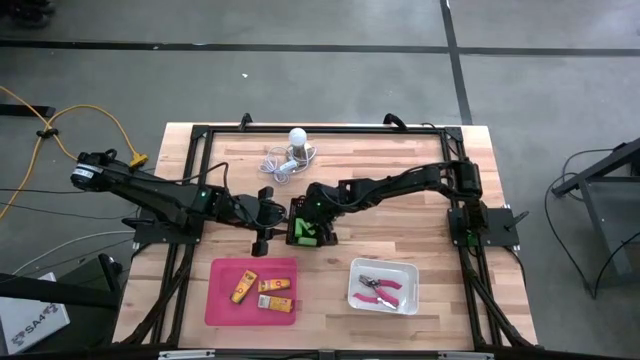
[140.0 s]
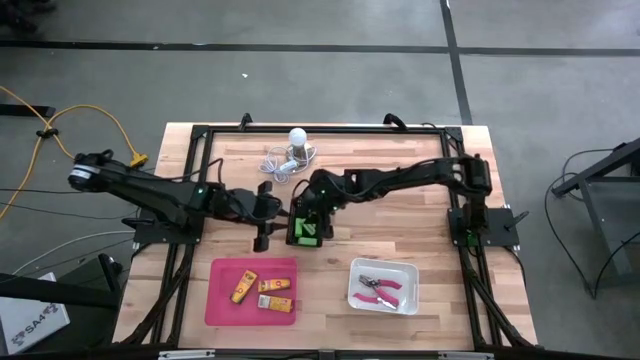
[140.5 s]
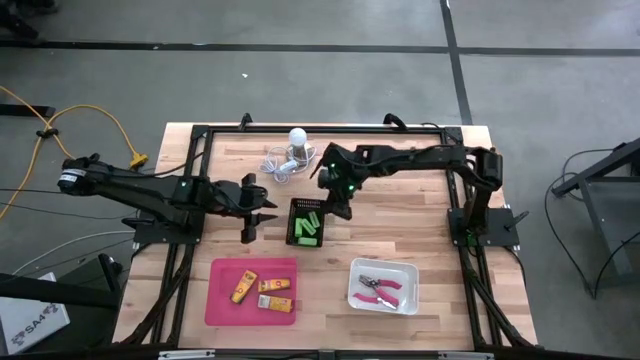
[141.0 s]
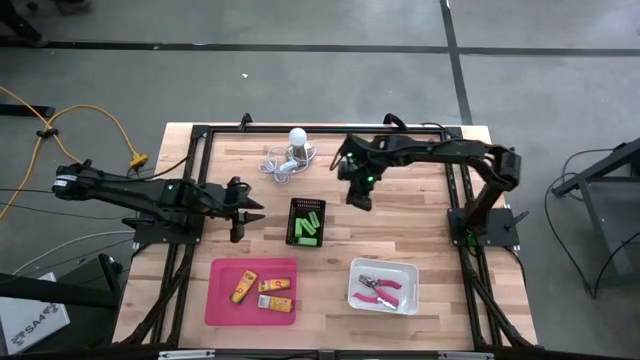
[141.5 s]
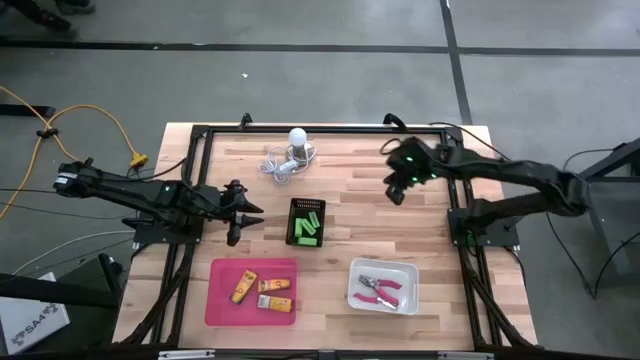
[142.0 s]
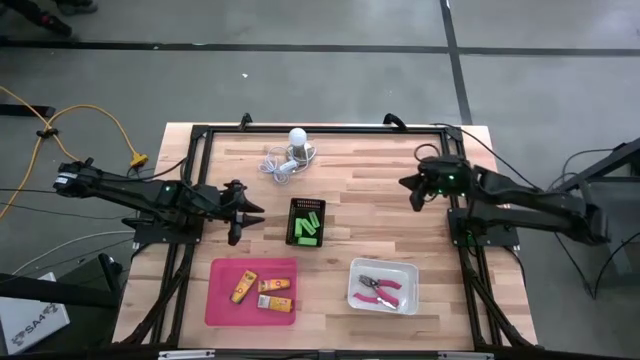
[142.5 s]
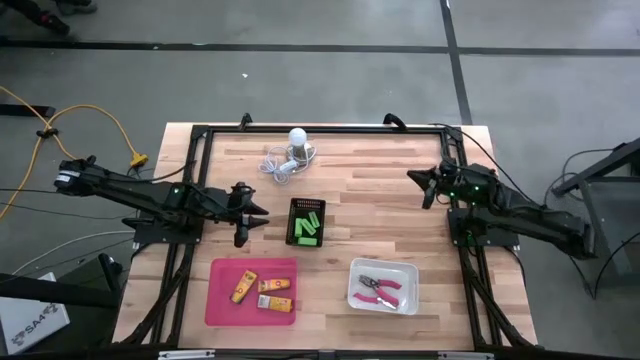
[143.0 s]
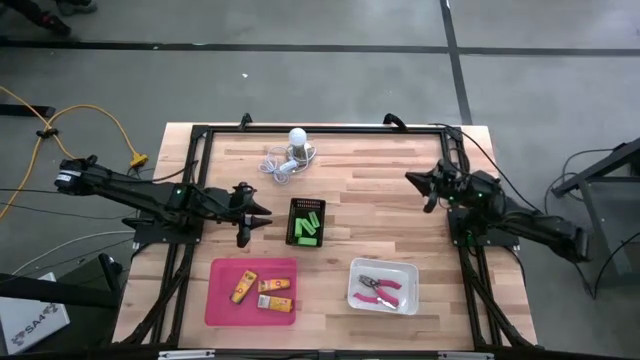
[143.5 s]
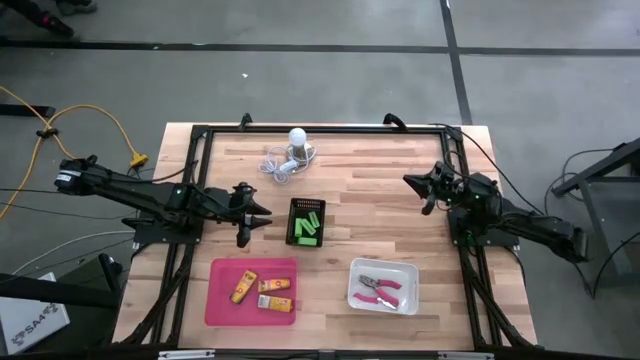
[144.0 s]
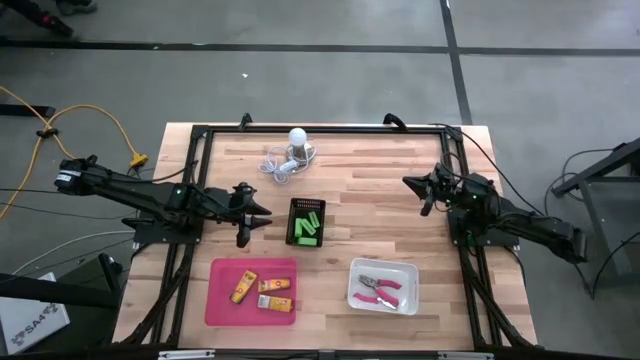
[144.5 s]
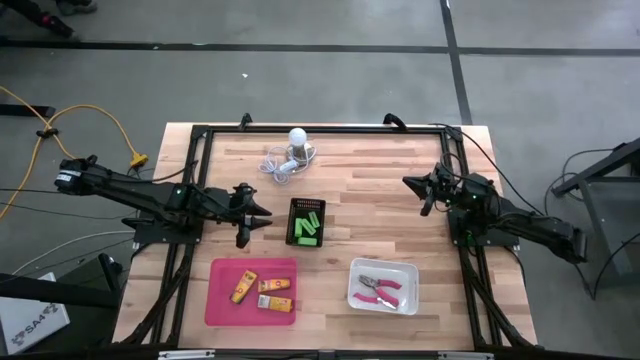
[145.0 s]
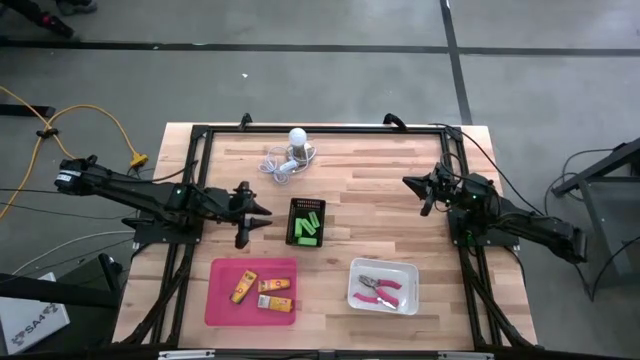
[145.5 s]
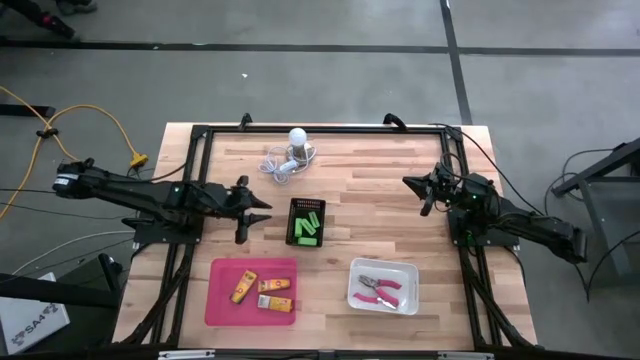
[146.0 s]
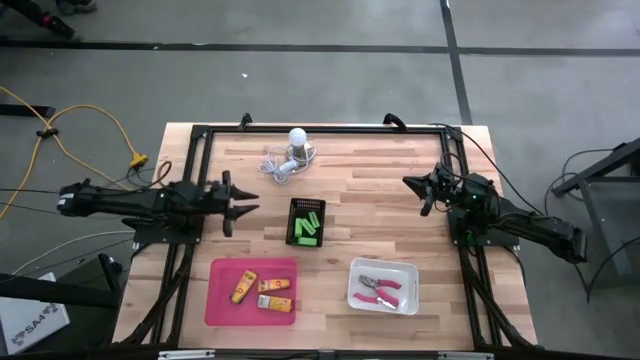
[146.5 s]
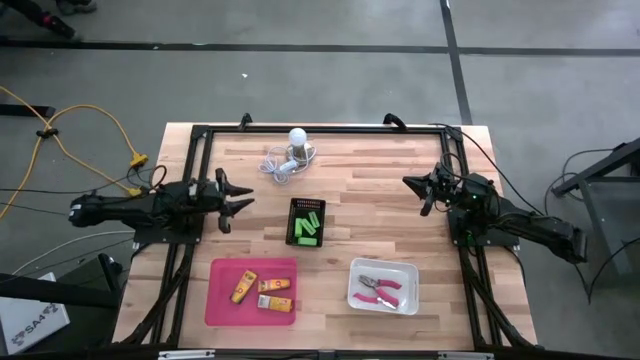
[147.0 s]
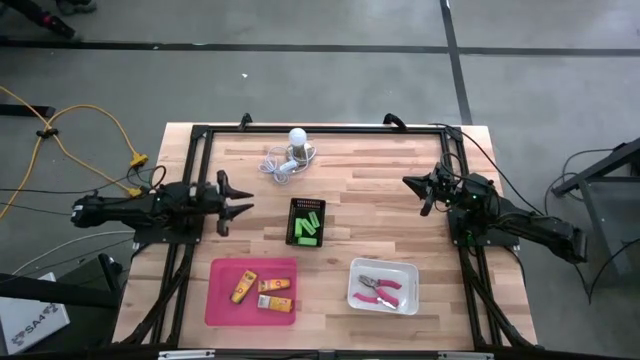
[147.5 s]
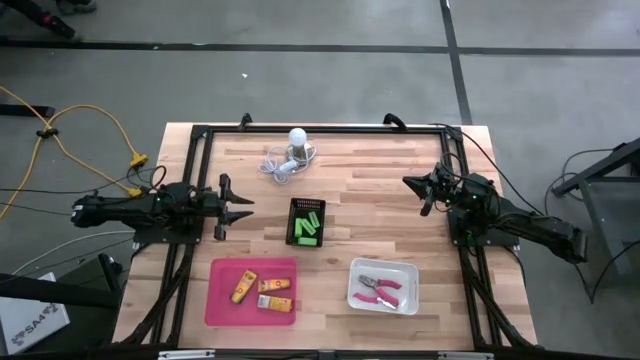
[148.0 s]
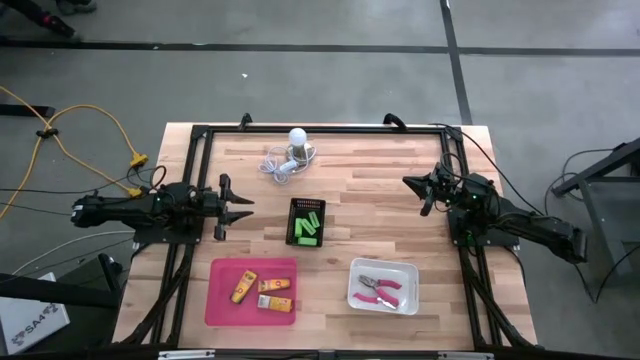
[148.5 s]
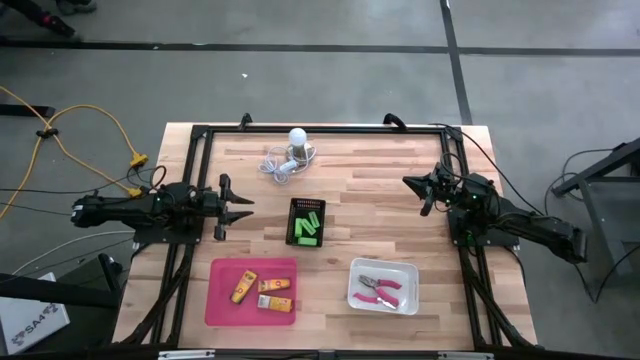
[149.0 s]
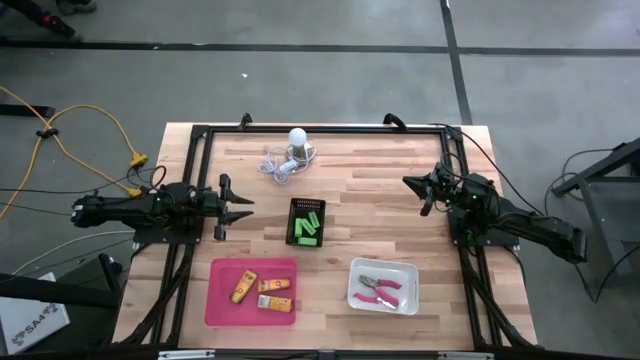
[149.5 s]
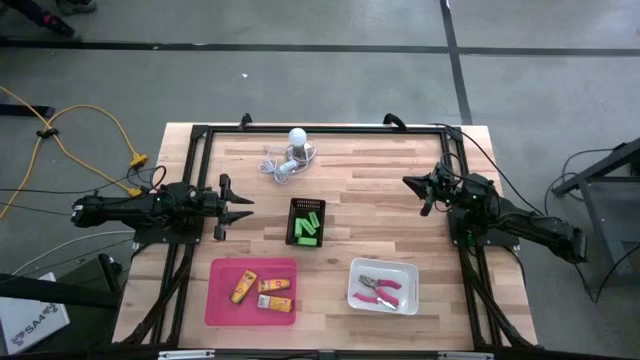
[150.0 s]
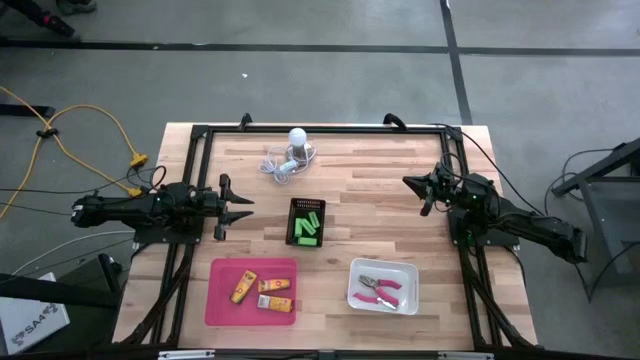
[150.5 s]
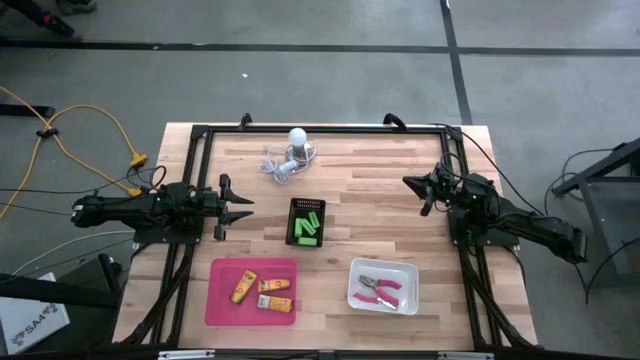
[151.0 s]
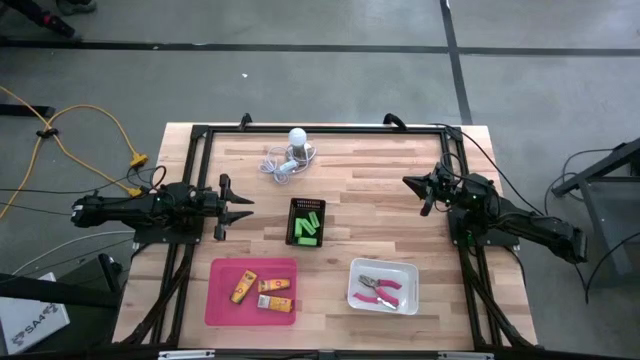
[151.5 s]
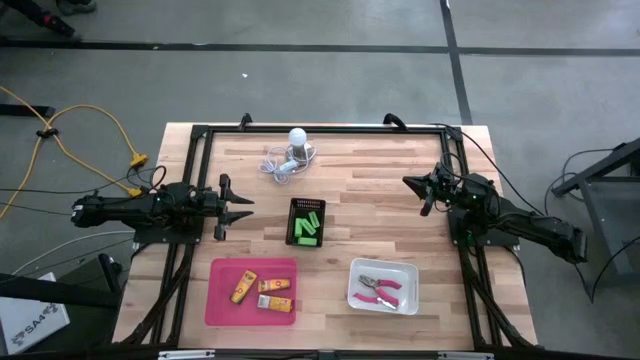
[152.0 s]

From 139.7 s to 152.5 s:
Task: Pick & Place School Supplies
Return to Home Position

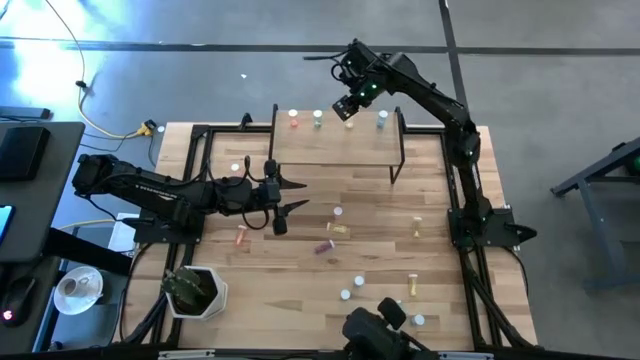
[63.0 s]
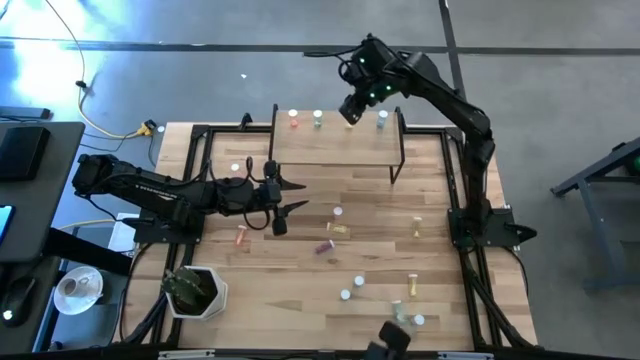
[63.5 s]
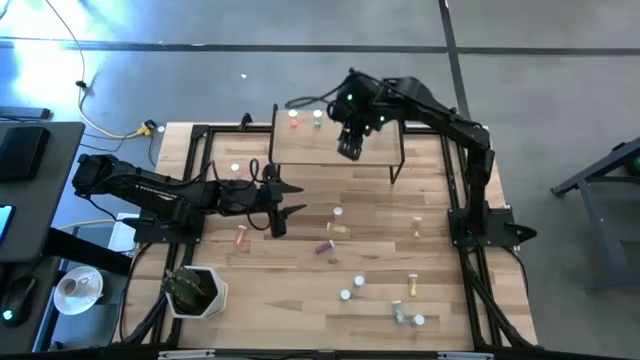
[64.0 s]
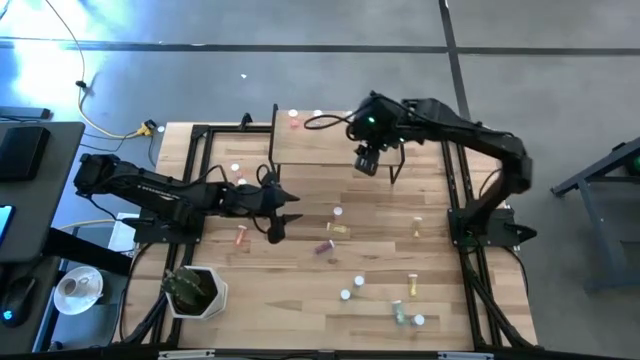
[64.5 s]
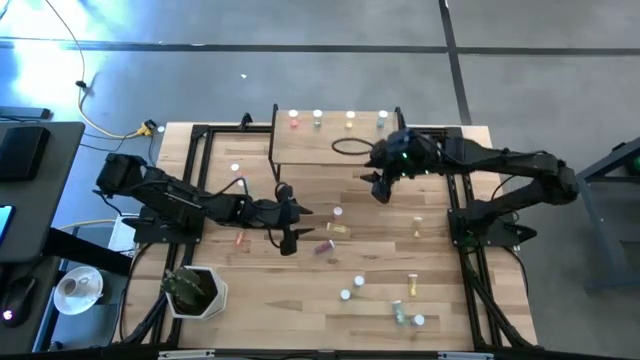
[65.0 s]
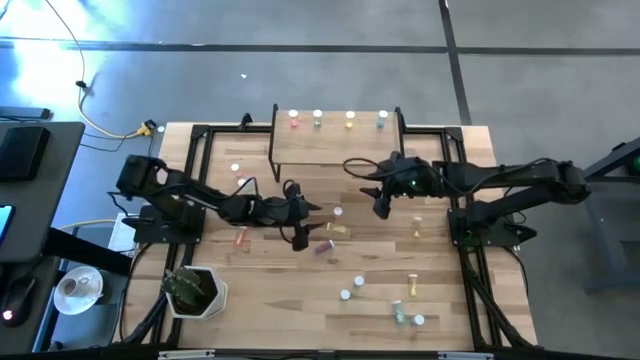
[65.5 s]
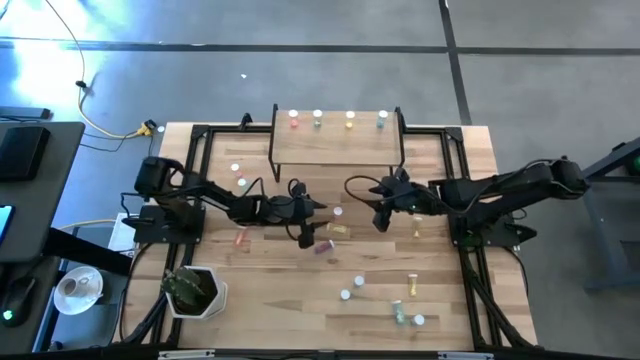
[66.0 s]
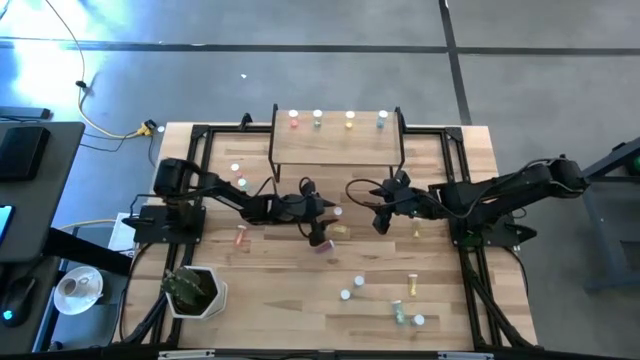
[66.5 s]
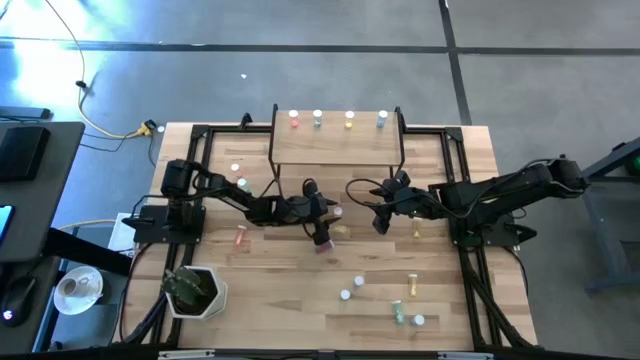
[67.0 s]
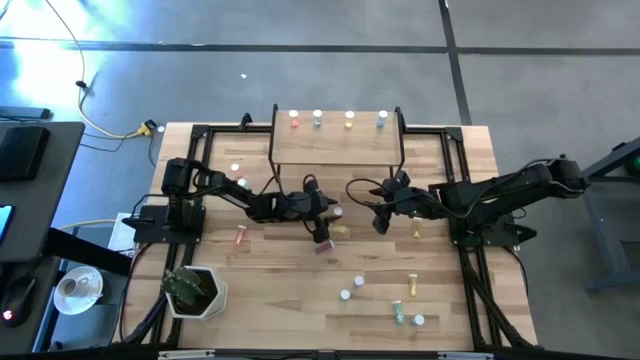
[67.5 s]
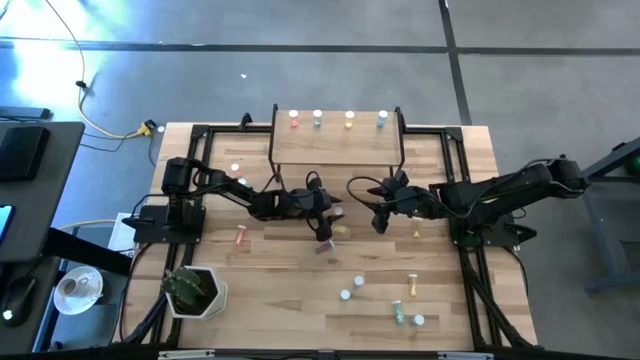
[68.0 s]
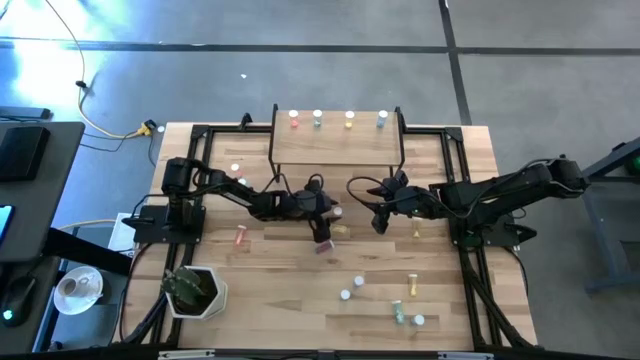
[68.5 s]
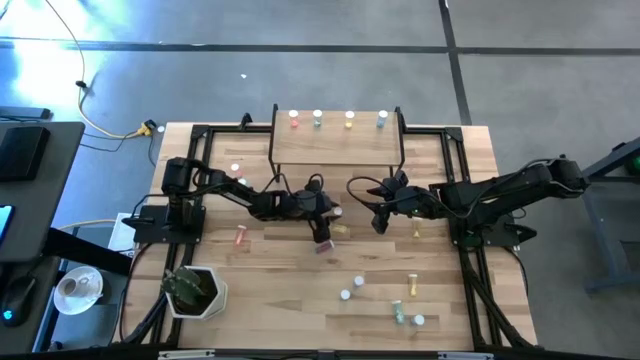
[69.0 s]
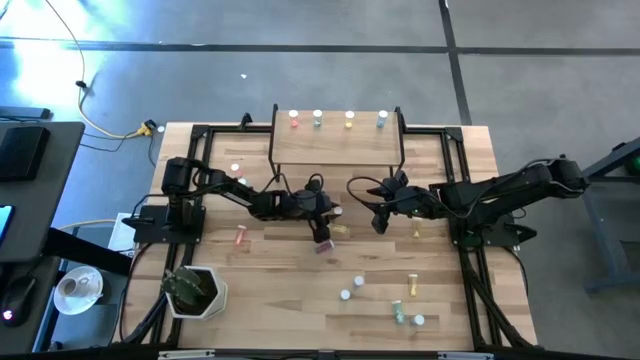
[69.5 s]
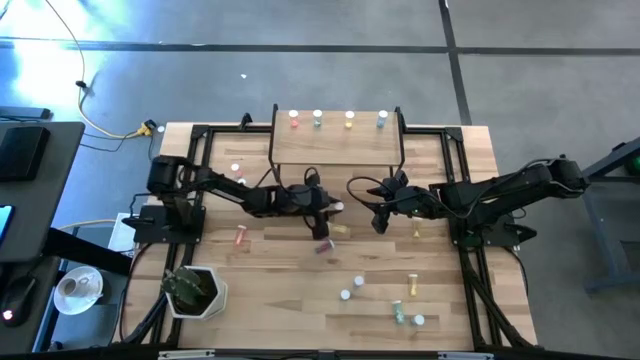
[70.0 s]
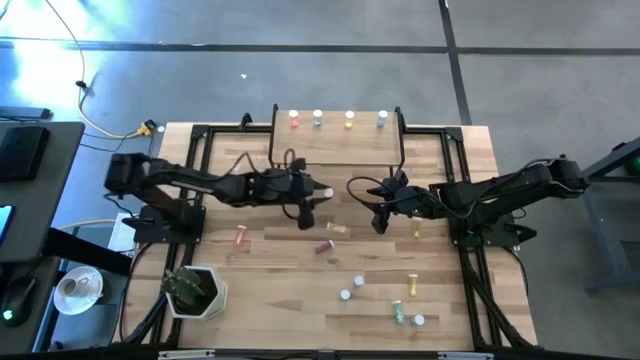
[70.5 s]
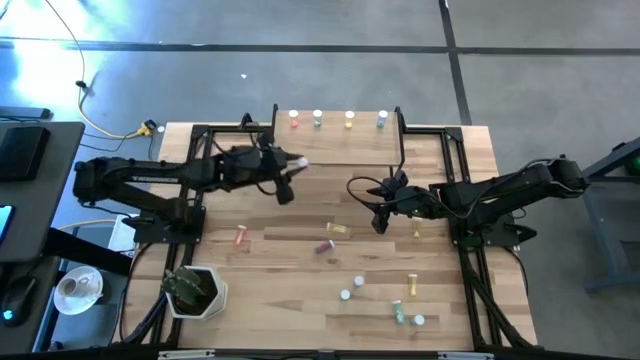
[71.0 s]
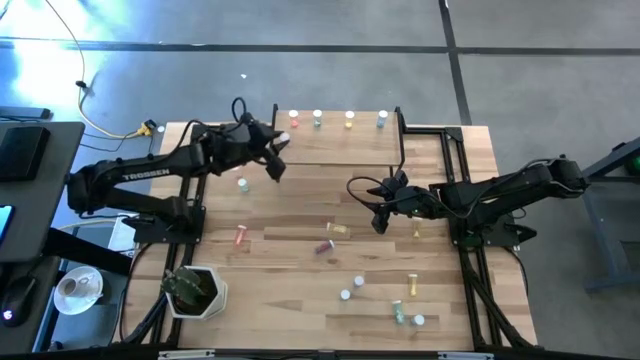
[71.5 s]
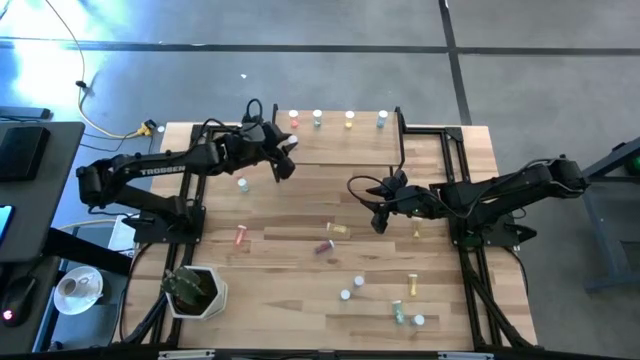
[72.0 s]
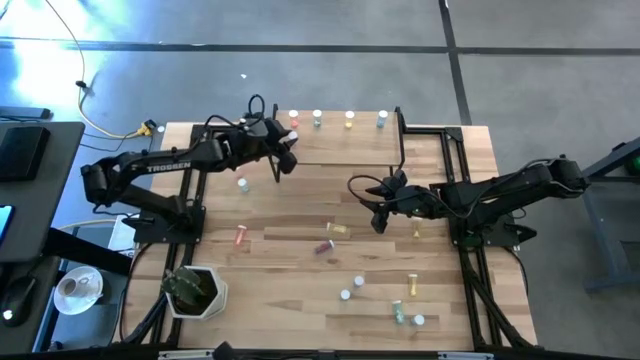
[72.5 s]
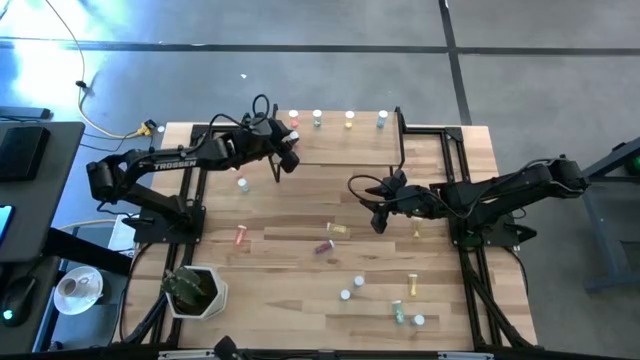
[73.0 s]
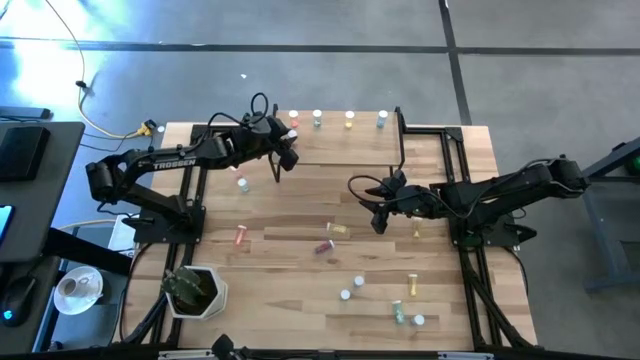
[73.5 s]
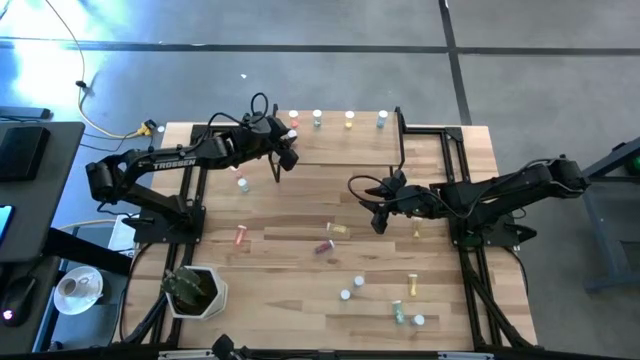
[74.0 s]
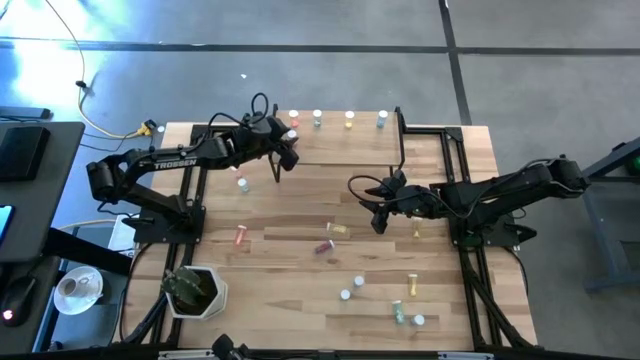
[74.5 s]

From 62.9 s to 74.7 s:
Task: Pick and place medicine bottles onto shelf by color
Put the red medicine bottle on the shelf
